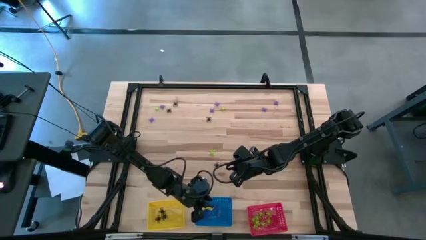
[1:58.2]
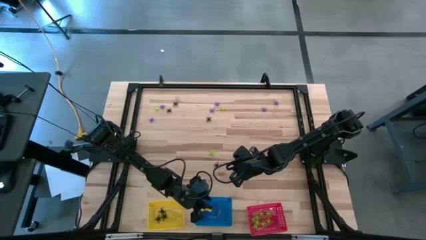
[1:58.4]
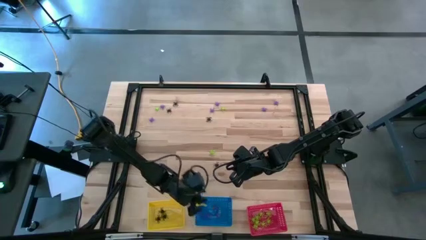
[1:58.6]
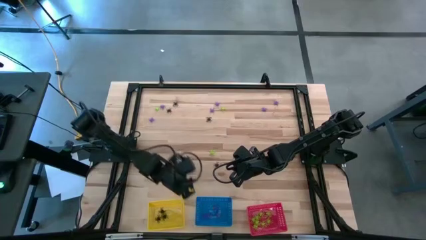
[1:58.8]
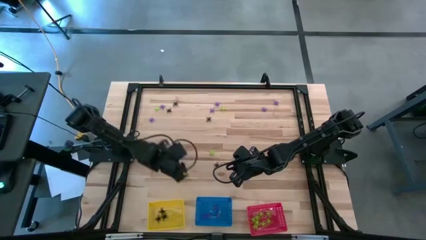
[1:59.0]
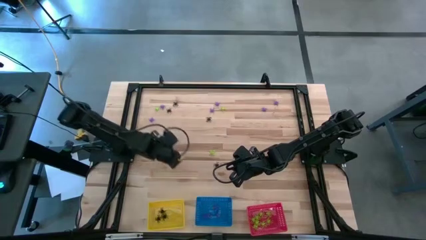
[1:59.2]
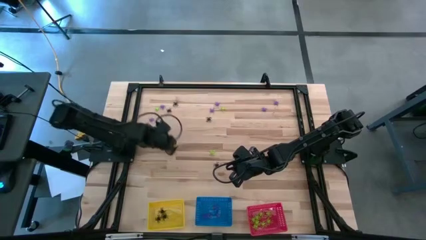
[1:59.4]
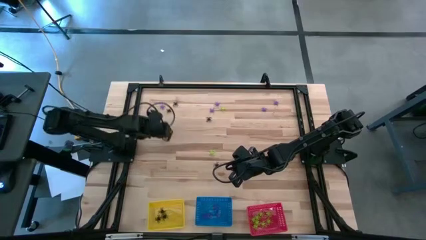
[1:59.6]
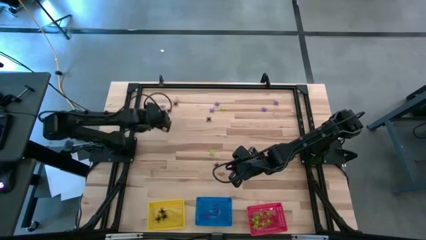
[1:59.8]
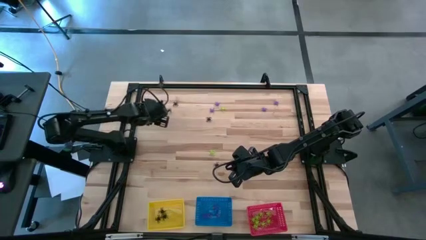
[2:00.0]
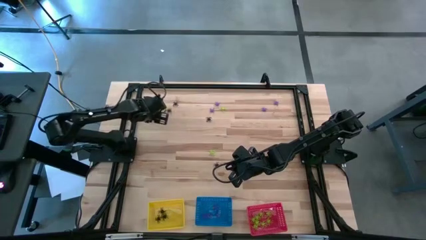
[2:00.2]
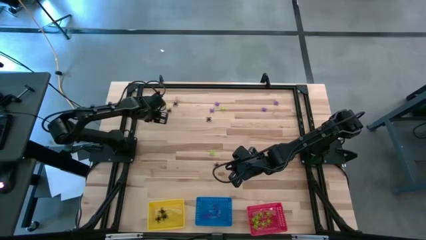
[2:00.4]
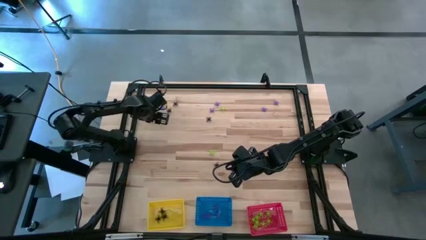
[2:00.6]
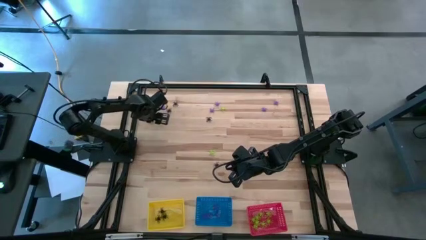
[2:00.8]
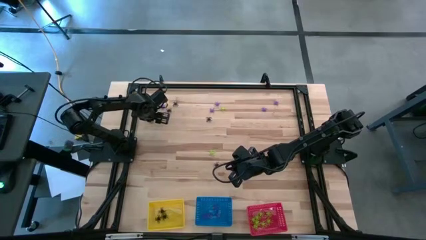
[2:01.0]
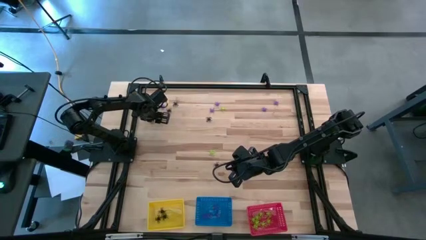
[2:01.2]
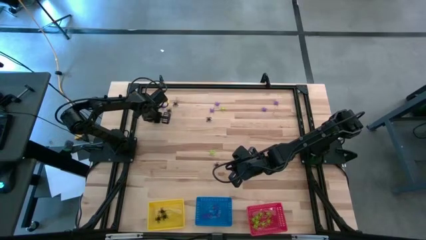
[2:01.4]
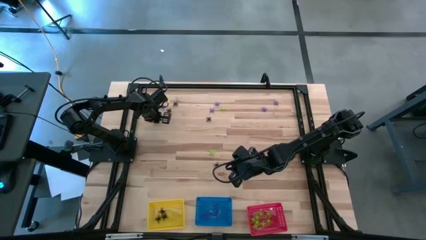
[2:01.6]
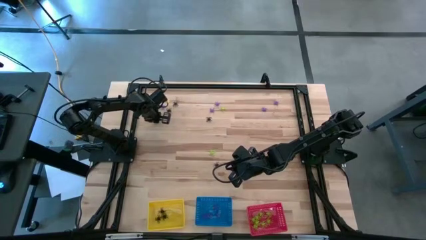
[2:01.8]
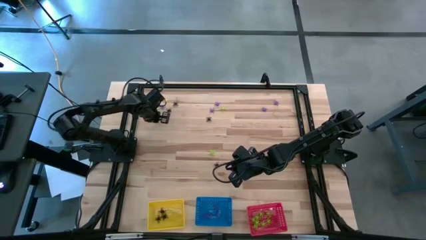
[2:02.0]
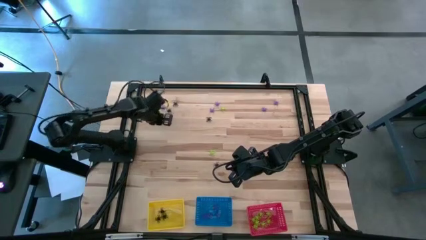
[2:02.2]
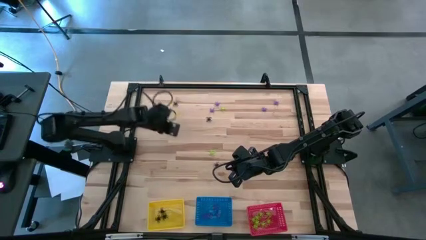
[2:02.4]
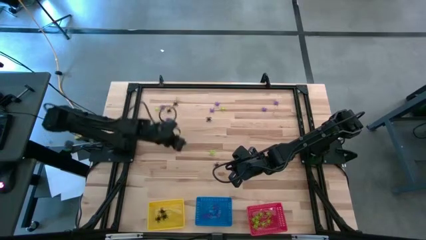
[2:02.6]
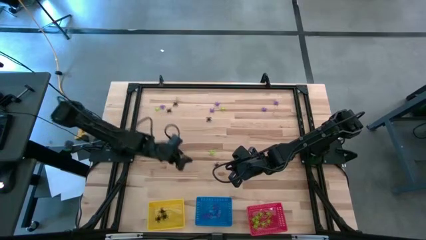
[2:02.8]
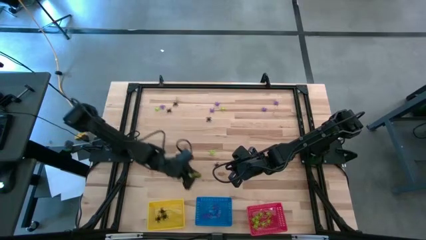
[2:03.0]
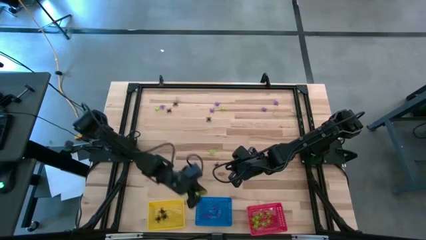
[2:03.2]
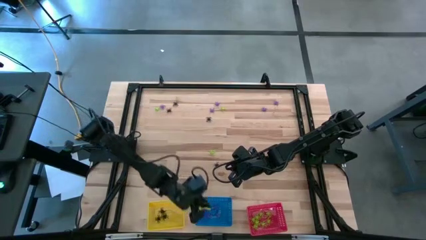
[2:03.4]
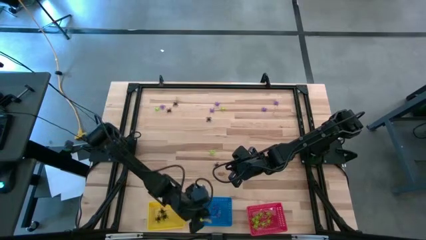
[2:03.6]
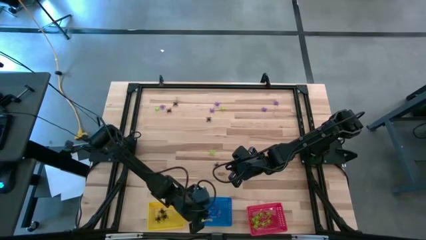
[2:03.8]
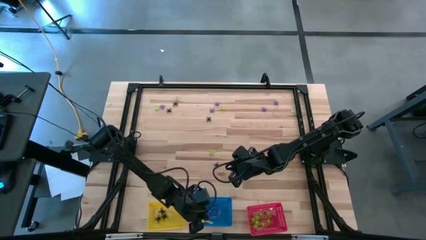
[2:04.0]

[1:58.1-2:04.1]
Task: Sort Halloween decoration
Put the violet spider toy into the blue bin

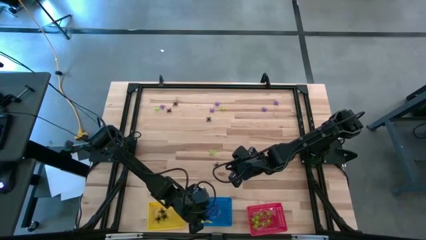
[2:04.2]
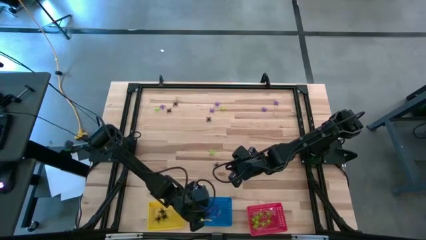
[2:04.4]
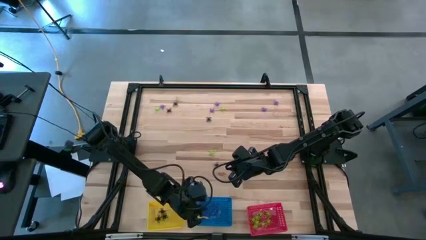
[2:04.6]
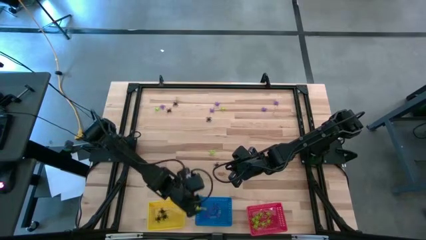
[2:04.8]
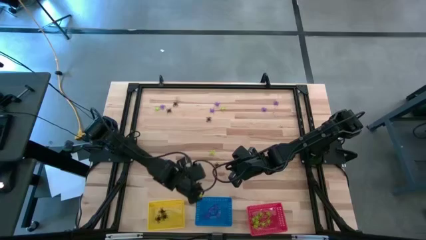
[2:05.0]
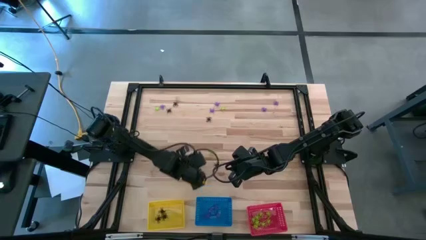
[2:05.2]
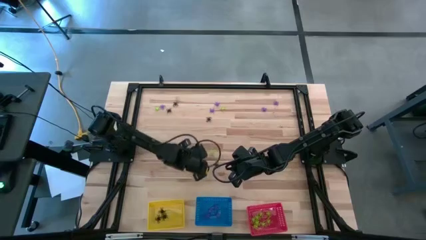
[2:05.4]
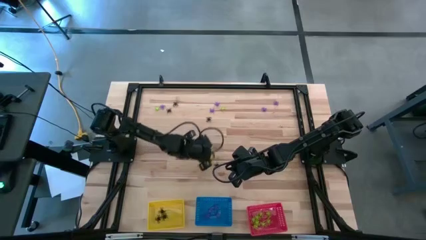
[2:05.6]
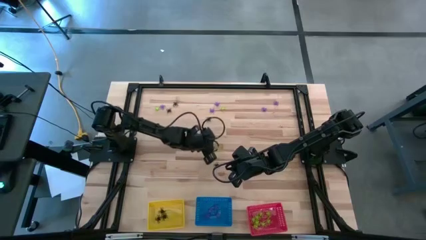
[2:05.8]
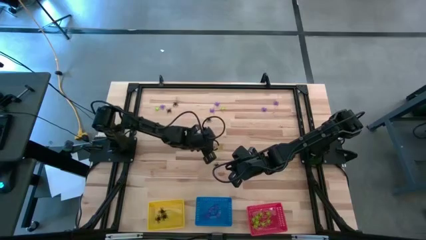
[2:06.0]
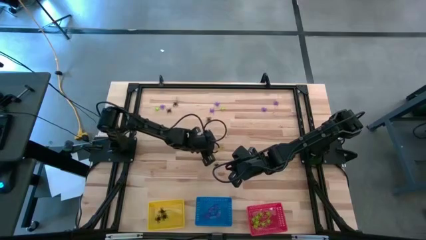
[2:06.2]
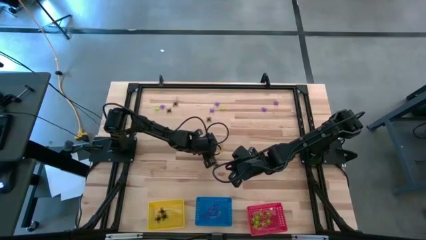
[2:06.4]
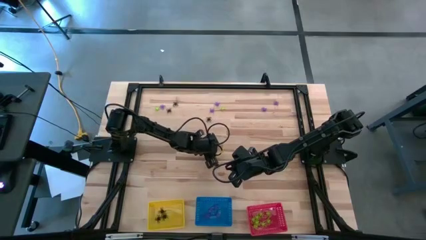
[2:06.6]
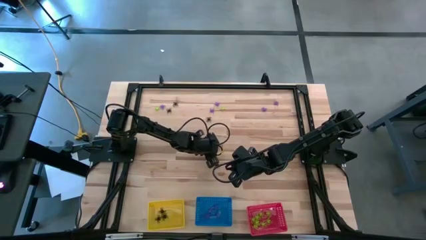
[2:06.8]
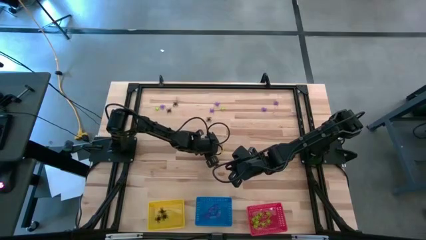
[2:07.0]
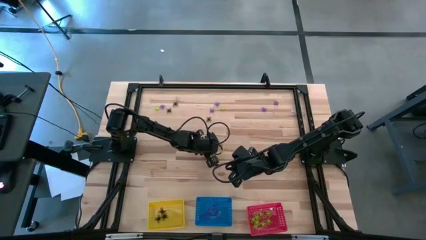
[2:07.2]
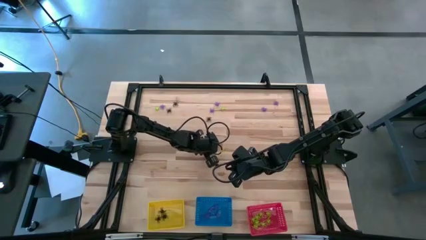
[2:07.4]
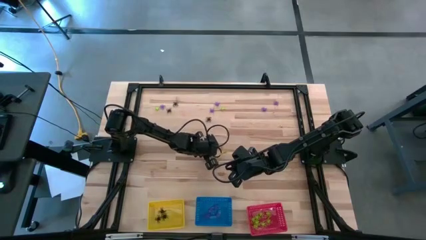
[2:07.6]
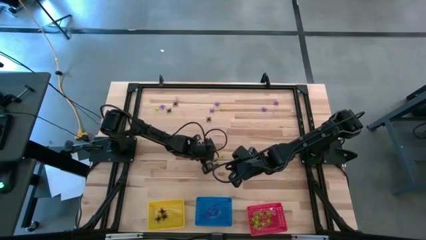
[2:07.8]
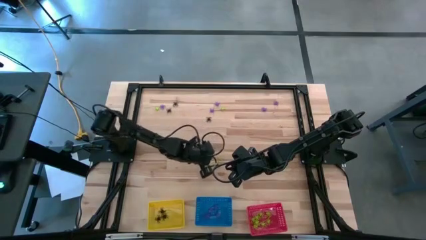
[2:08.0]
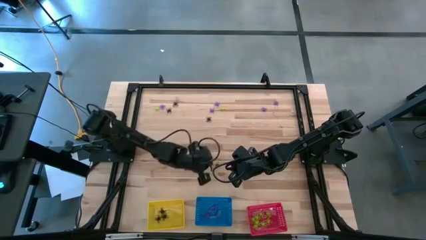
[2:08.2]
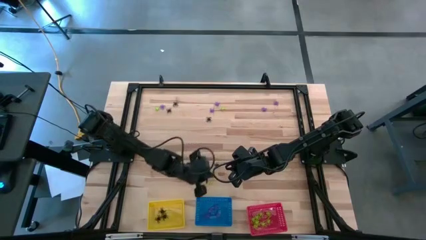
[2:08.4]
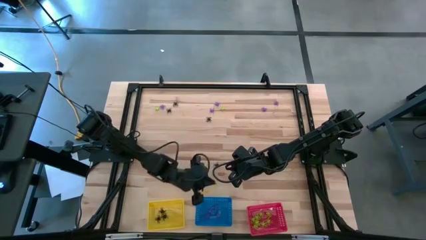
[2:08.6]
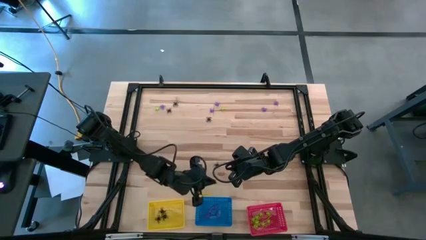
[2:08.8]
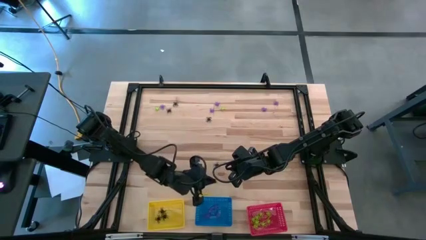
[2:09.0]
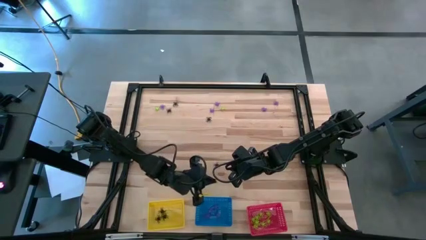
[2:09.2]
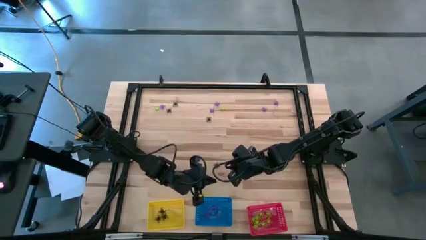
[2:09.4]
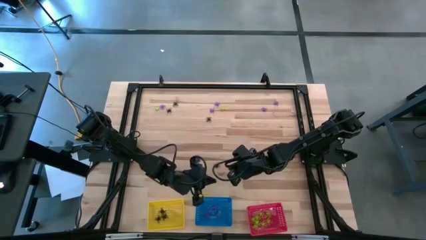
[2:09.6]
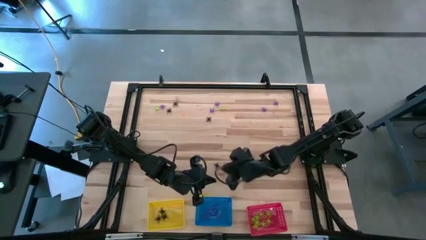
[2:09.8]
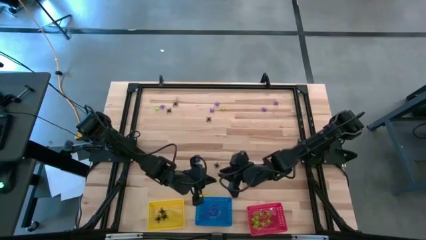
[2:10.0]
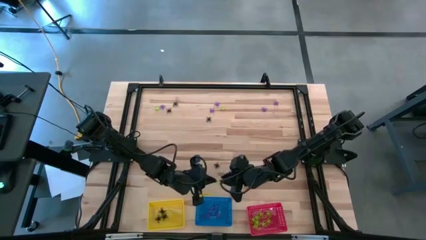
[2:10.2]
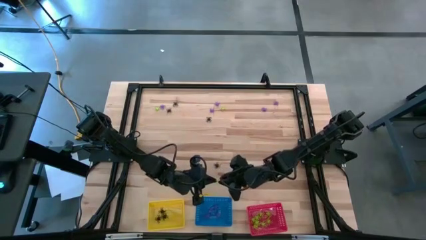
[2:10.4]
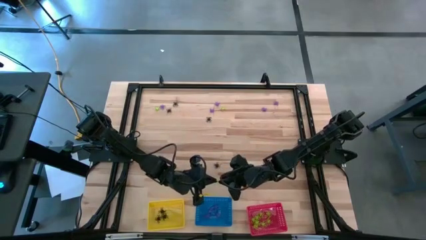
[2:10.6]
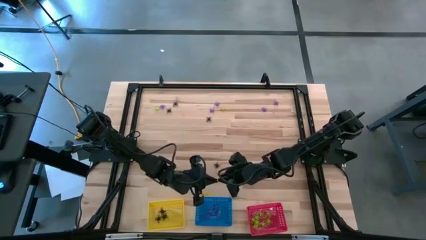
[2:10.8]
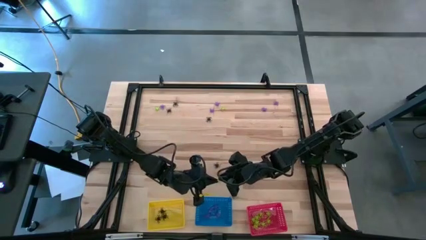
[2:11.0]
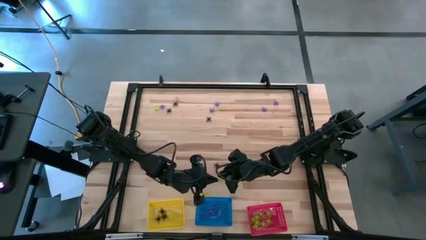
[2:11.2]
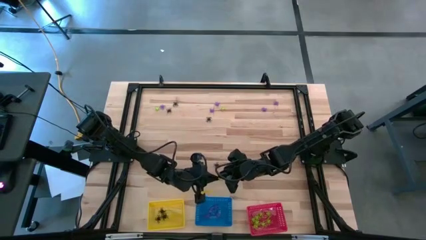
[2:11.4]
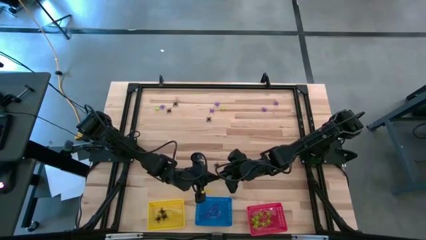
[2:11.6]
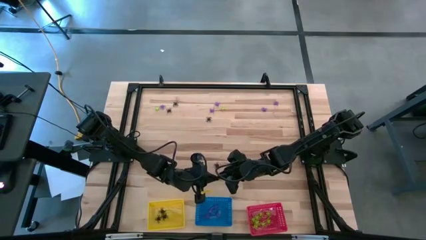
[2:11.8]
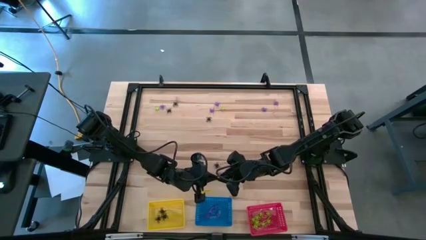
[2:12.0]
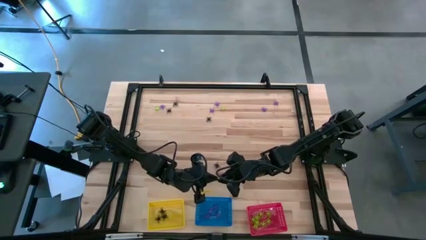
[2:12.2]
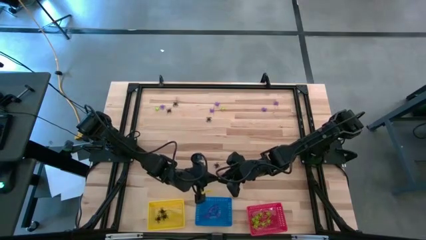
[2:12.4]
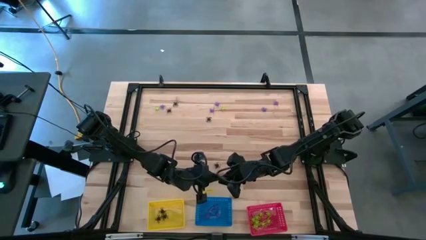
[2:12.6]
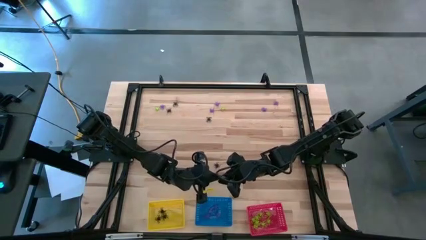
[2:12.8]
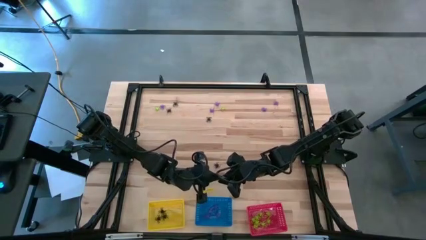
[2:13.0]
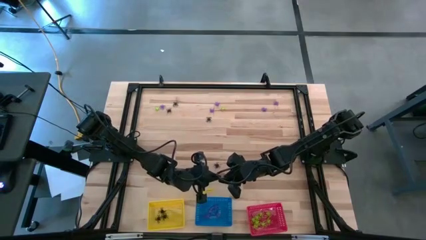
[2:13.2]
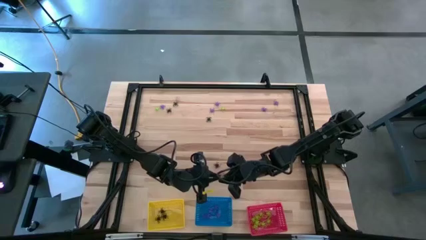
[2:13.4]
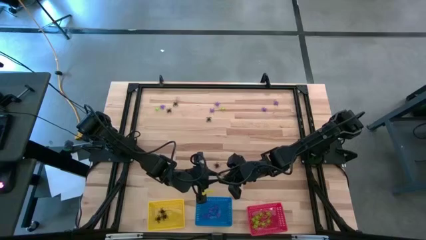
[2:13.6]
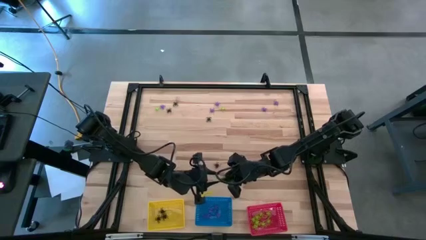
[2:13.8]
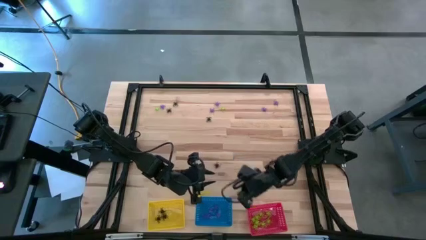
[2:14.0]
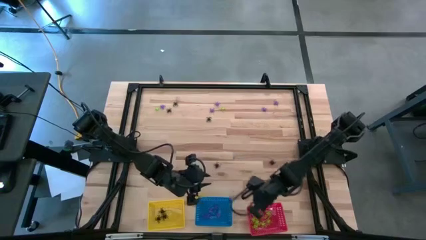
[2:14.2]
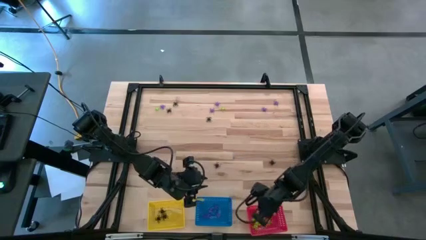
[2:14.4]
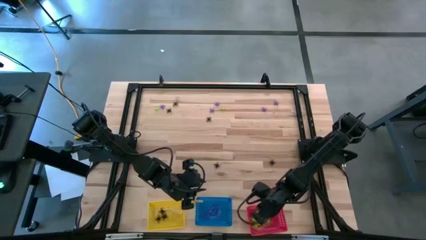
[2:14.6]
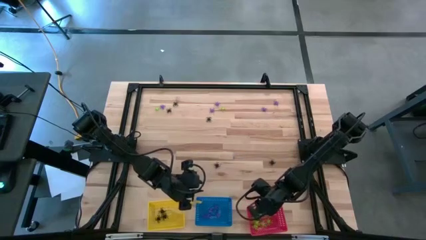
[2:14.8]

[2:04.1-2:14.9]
Put the green spider toy into the red bin
